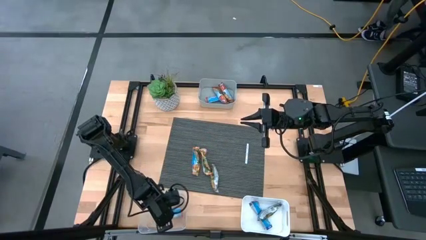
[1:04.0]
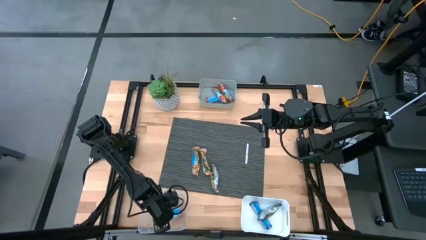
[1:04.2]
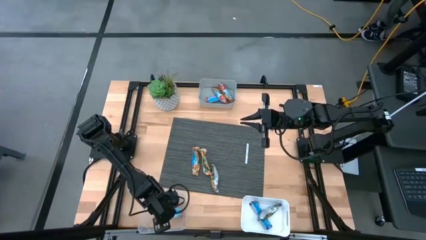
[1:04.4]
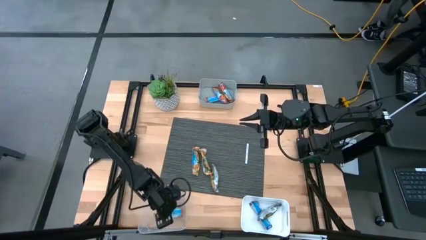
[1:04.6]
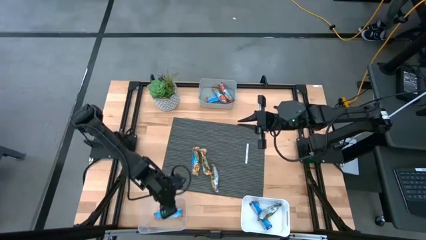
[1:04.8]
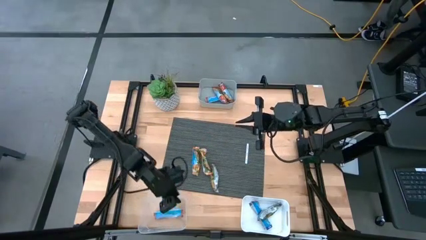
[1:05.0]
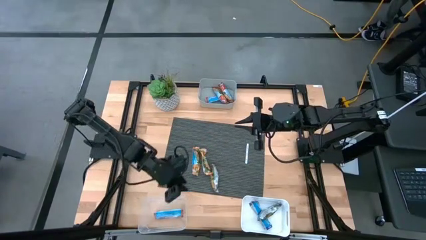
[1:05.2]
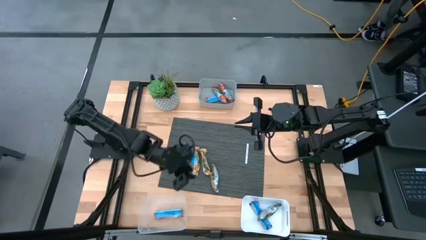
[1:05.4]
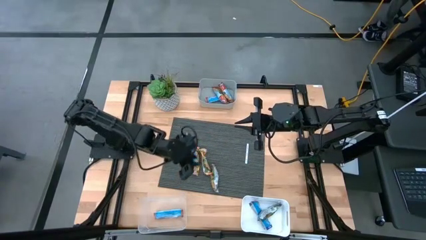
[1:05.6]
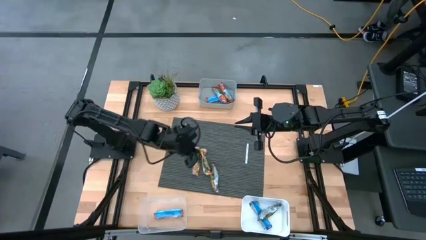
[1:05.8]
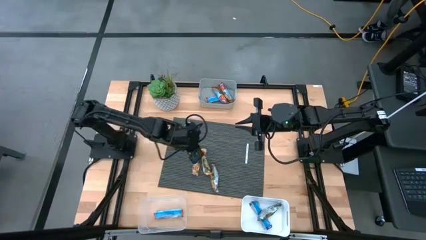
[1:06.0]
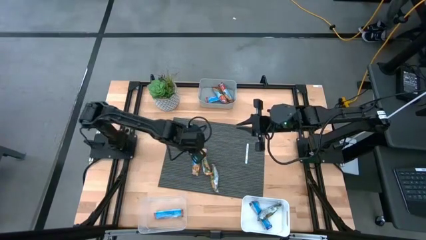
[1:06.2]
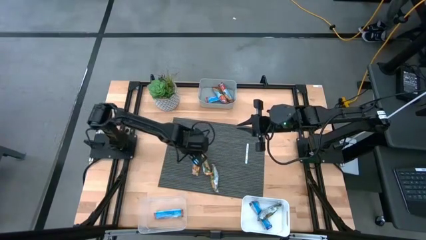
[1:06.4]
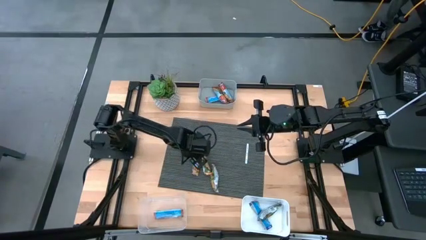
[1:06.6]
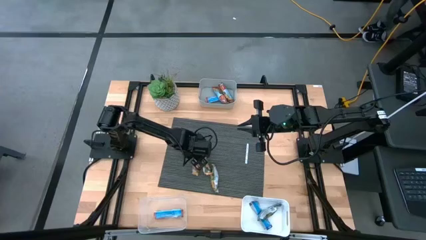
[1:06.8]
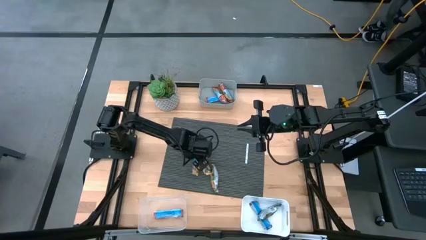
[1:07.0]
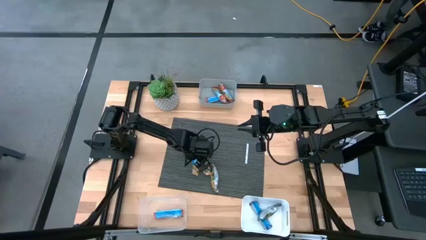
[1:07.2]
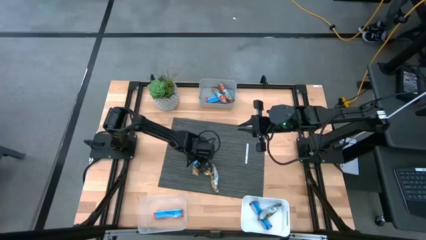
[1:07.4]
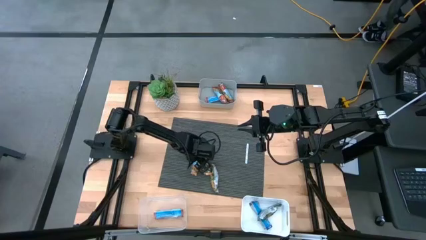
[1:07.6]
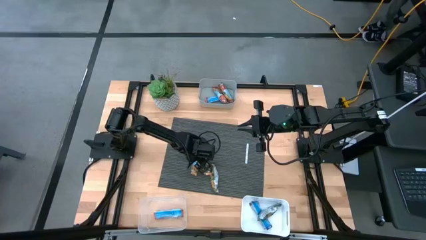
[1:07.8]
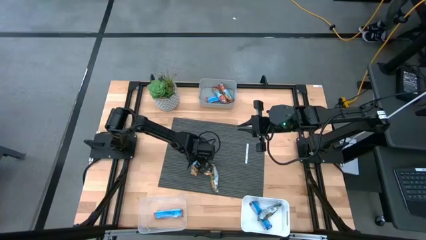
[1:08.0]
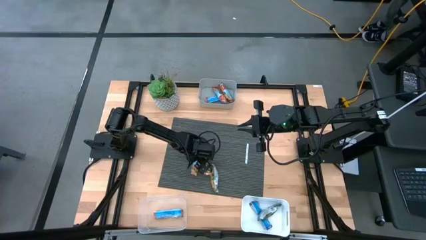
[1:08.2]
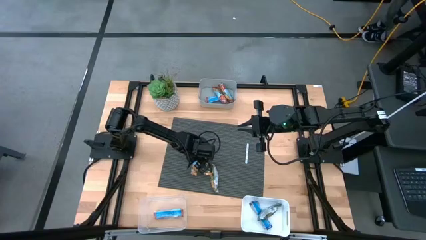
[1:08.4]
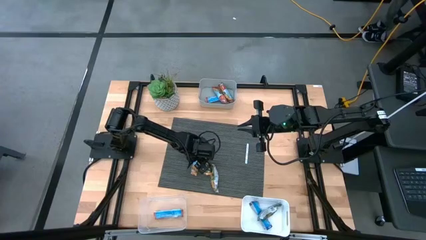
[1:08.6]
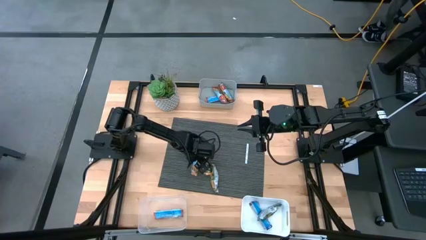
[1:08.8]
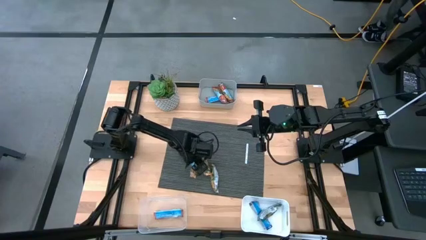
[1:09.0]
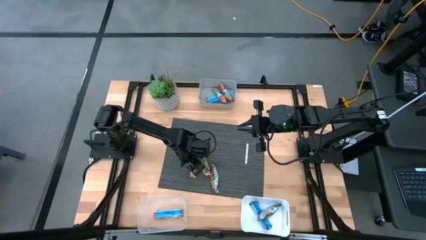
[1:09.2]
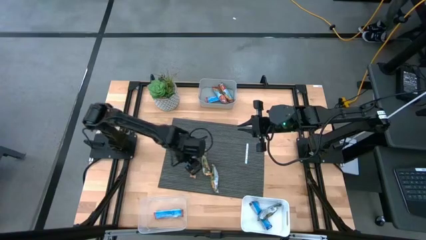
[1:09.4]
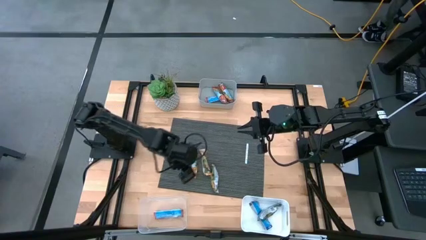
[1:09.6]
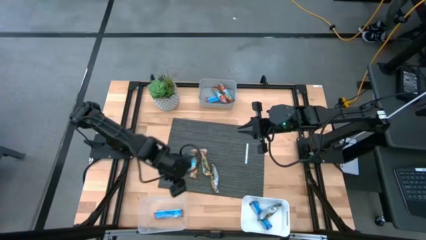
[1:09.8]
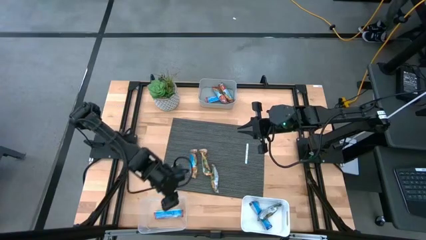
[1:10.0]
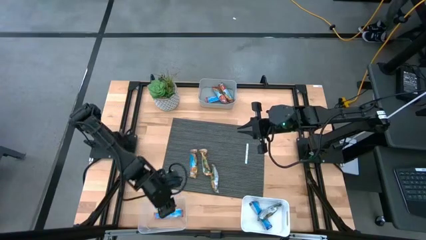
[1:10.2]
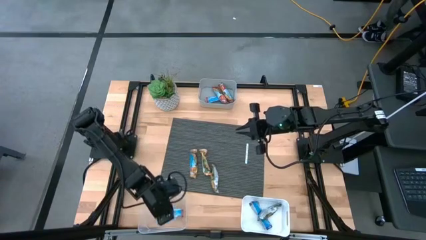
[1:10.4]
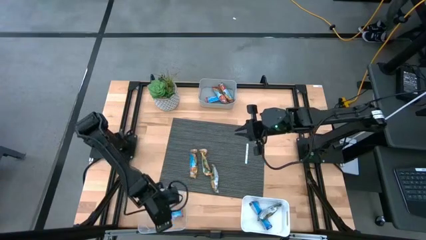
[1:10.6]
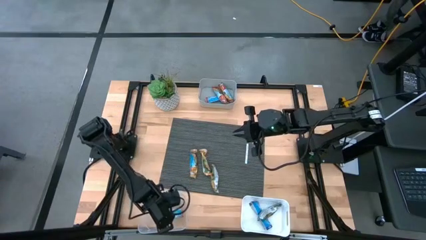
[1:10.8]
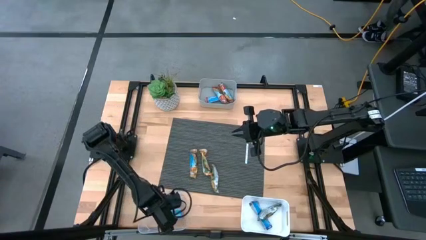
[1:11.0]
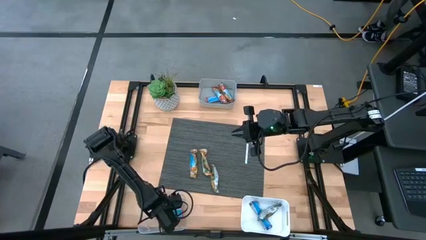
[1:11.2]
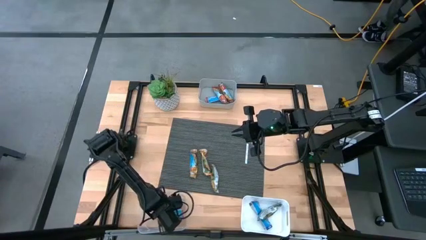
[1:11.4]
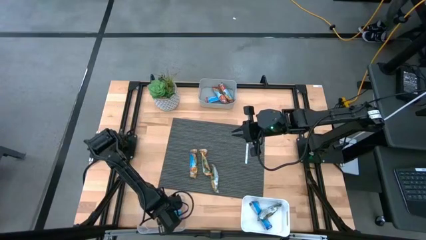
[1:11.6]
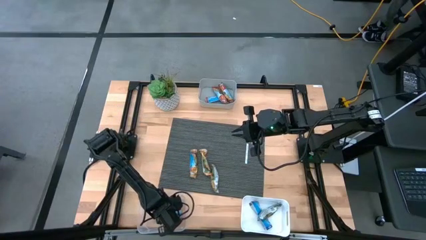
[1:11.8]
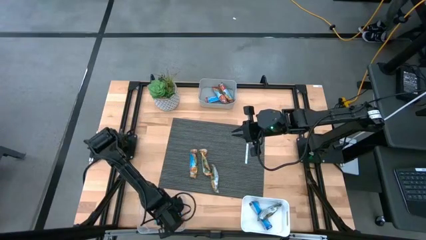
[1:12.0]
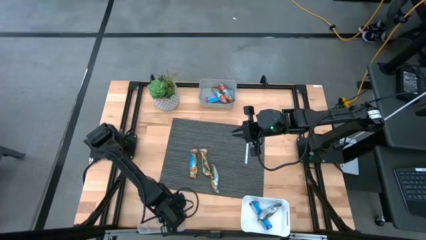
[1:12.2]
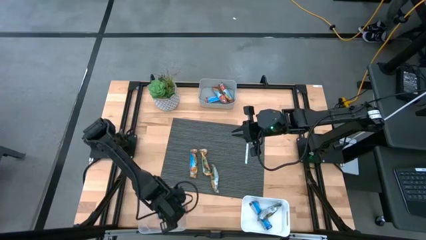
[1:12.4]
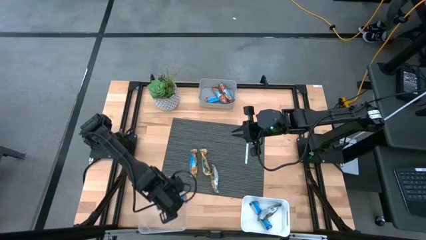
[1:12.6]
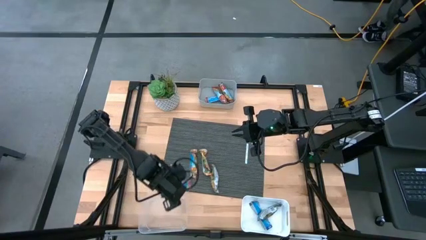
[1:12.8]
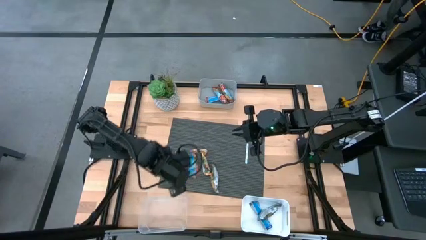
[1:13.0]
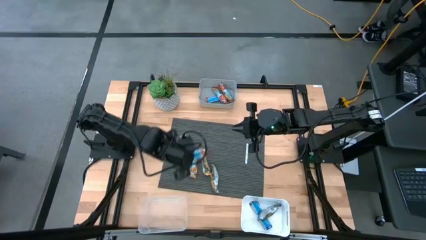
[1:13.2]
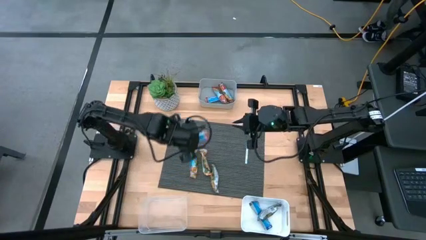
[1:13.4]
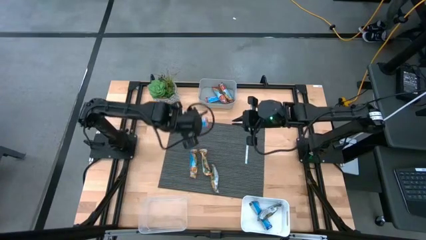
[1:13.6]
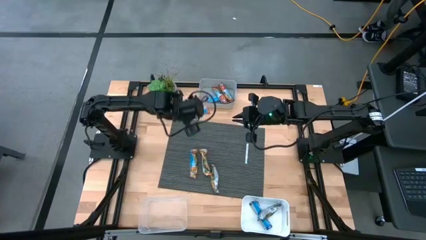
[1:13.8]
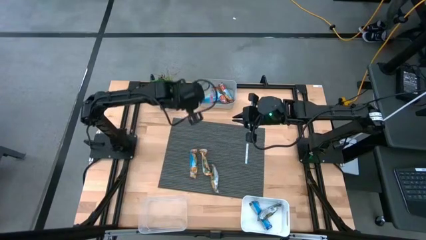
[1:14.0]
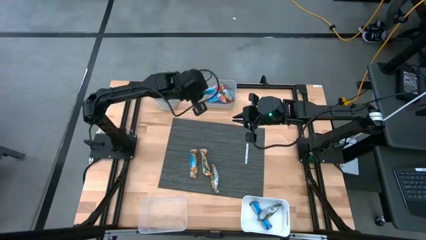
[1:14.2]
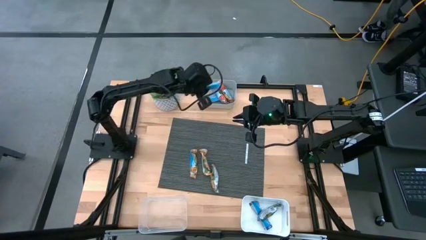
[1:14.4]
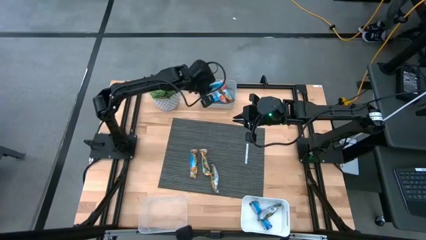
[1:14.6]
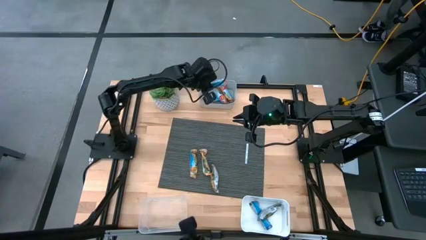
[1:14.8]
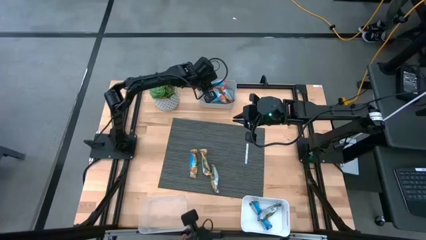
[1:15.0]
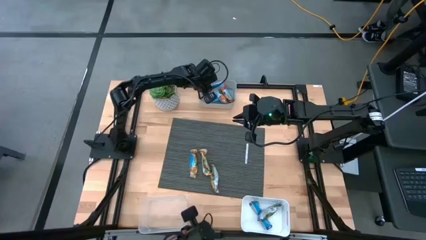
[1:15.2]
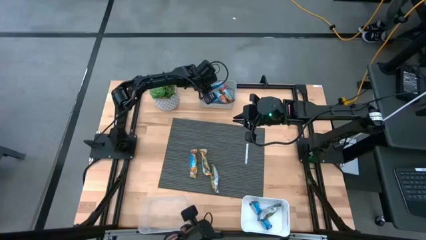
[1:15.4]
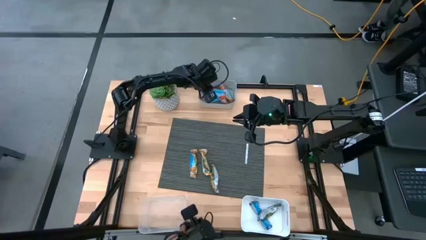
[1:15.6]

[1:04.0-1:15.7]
Task: Pick and place Granola Bars by type
Put the red granola bar into the gray bin

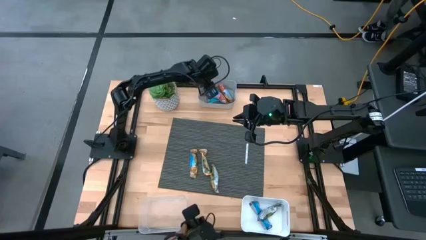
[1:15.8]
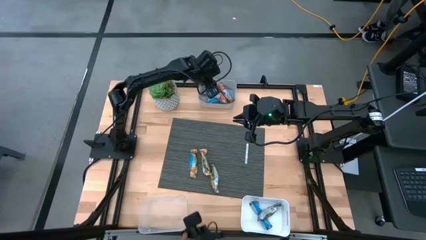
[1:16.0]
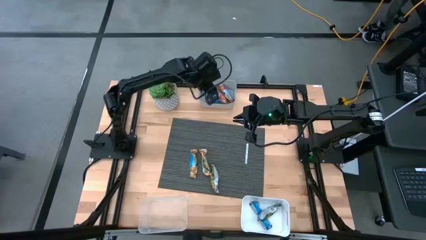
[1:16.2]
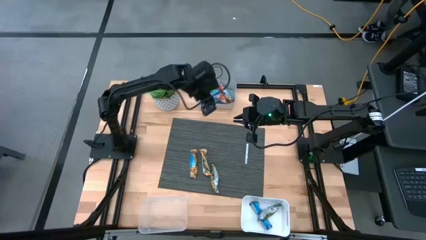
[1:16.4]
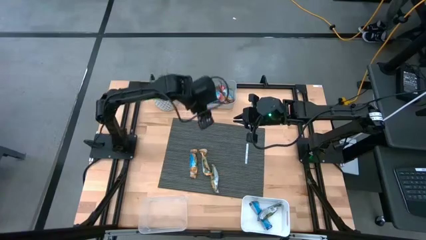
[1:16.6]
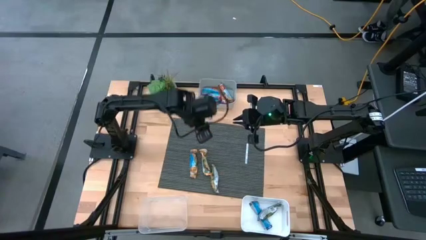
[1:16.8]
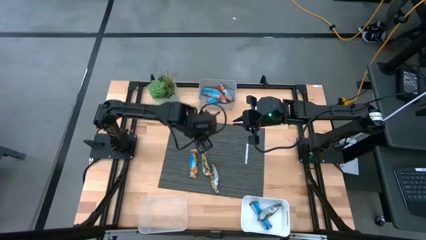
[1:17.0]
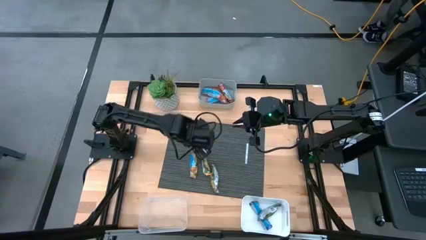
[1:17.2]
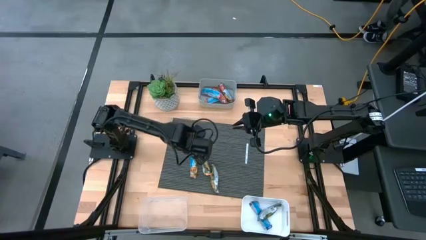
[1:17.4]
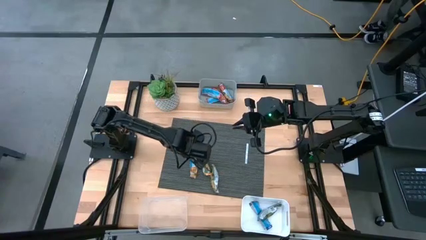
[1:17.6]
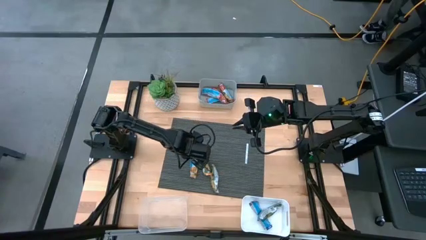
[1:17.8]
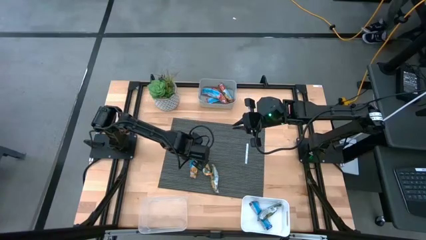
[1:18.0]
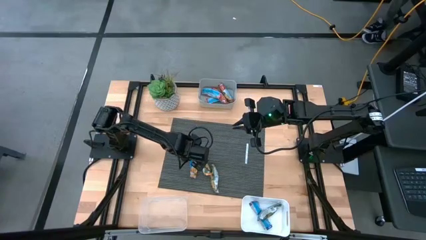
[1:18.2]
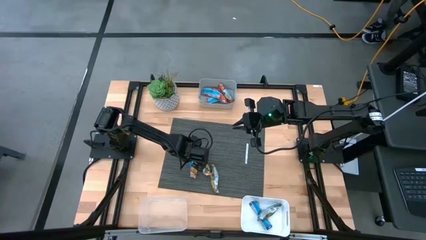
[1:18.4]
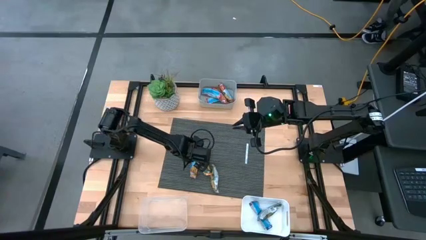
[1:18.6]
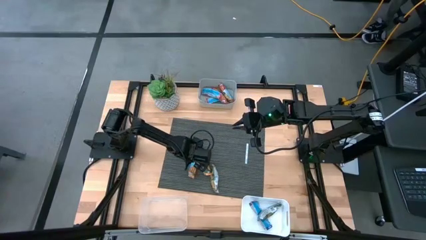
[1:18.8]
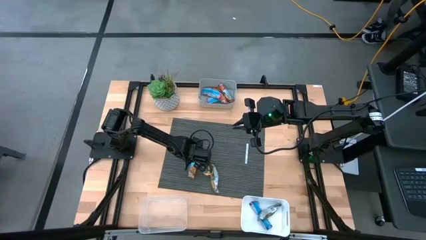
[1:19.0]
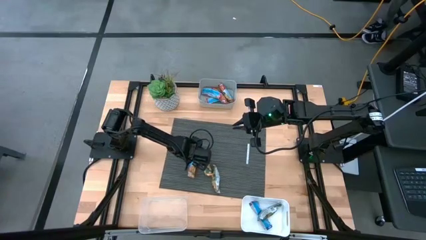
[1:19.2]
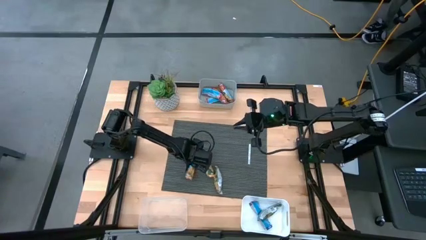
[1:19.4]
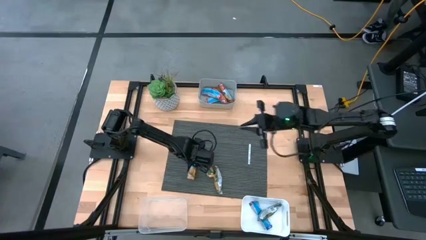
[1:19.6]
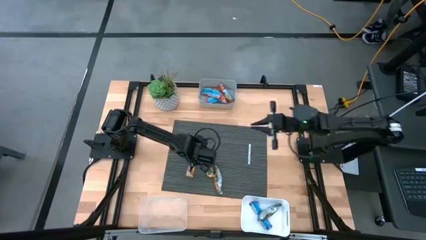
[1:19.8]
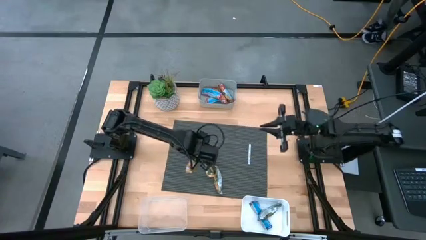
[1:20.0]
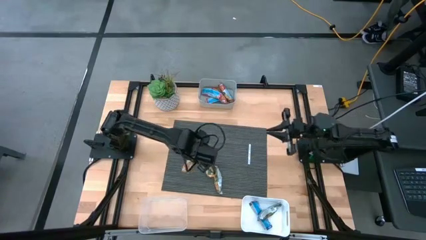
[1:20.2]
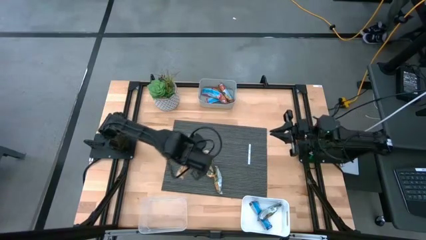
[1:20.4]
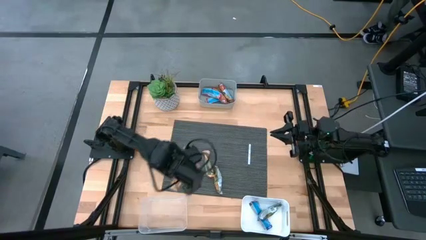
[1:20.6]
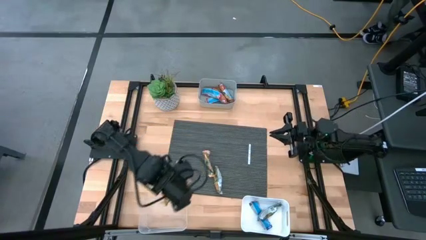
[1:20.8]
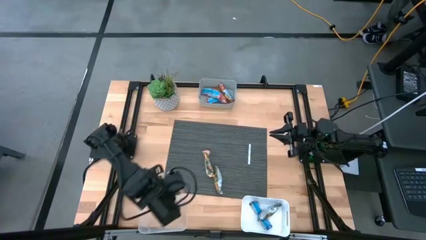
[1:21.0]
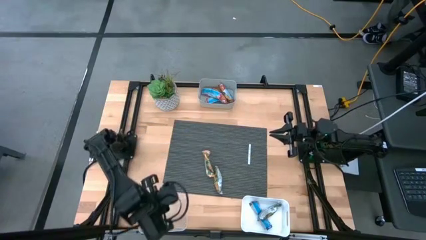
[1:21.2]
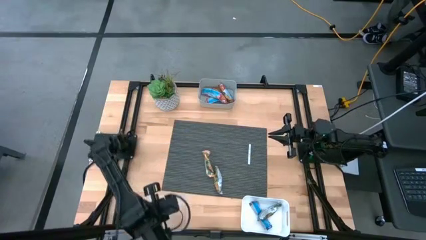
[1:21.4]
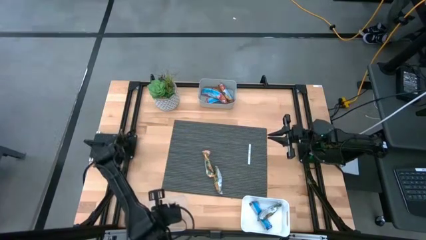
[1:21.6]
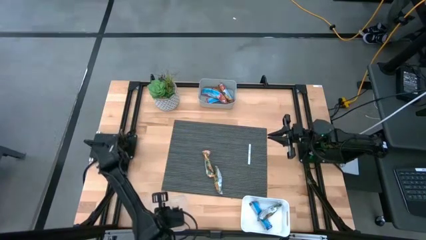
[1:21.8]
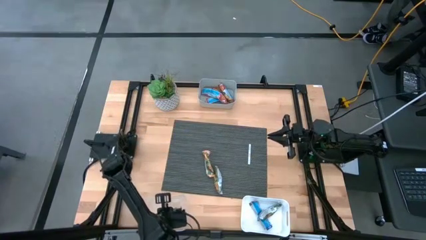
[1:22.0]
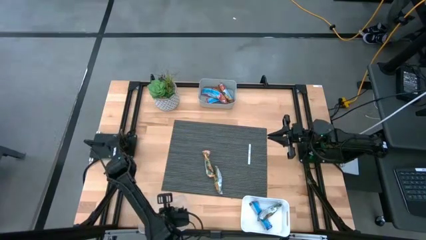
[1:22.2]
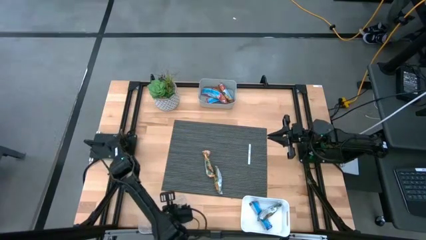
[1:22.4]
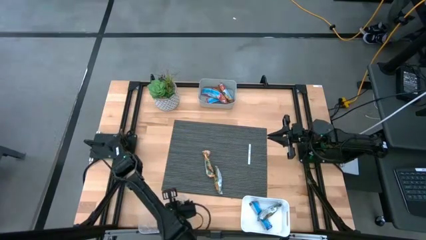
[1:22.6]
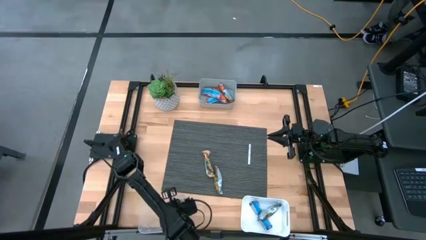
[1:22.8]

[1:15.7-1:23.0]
Put the yellow granola bar into the transparent bin
